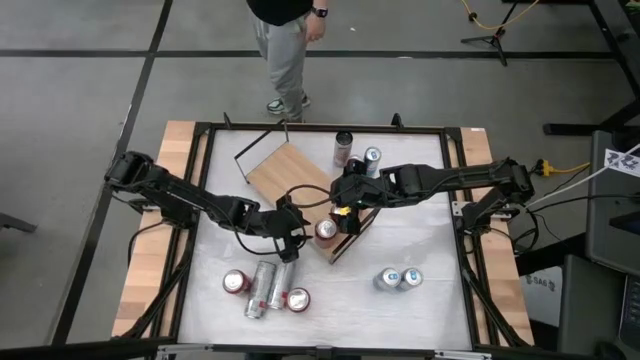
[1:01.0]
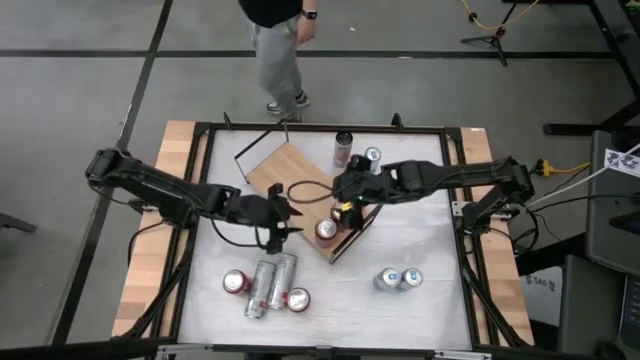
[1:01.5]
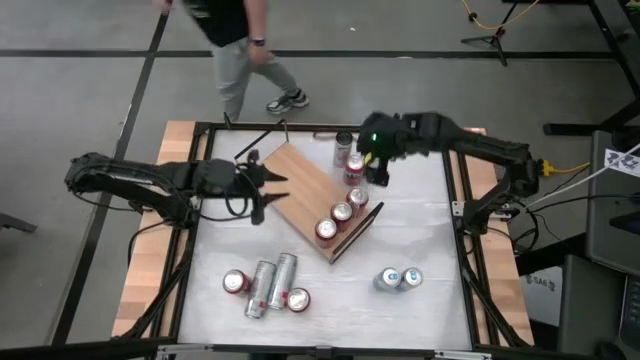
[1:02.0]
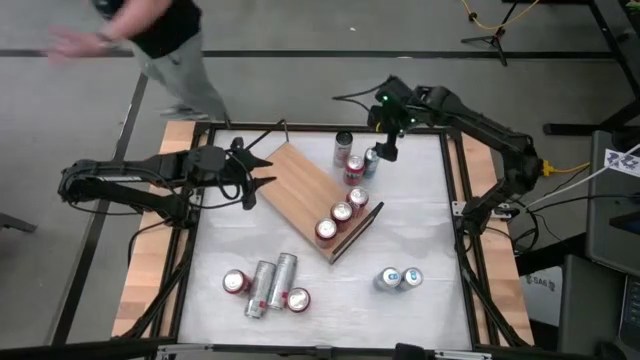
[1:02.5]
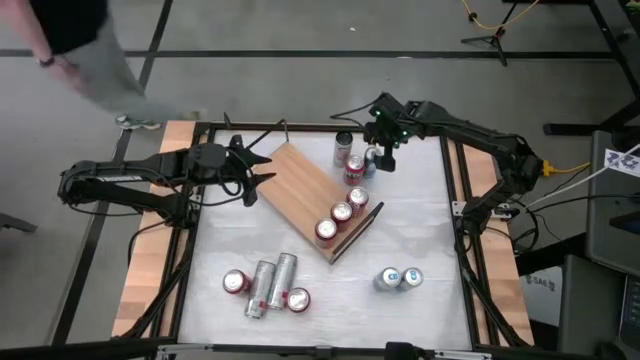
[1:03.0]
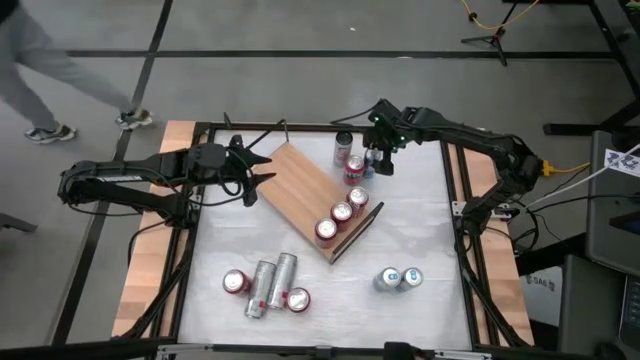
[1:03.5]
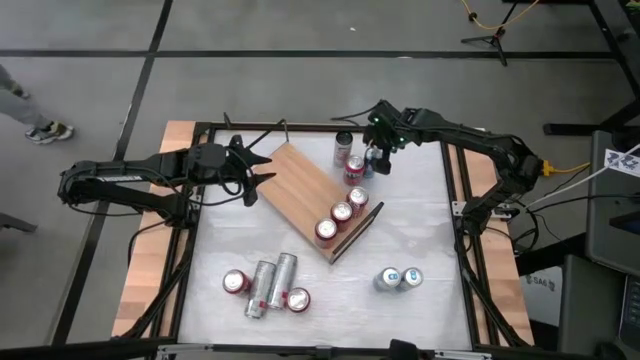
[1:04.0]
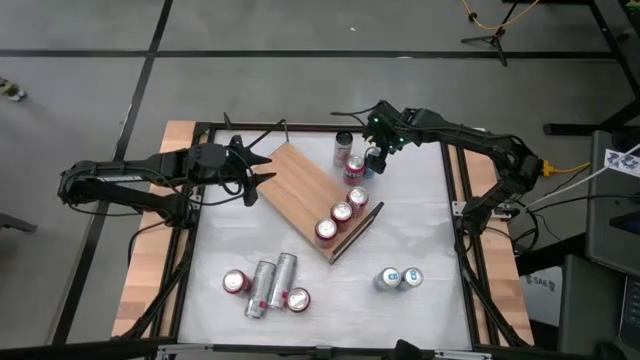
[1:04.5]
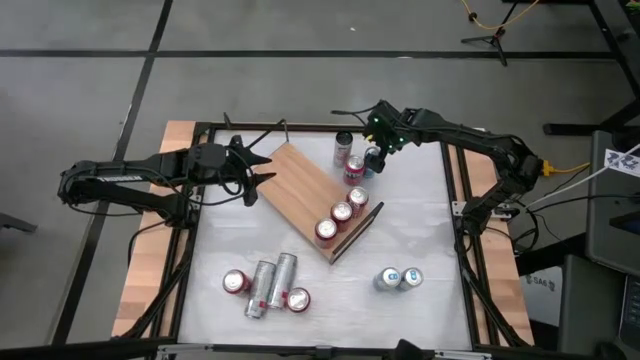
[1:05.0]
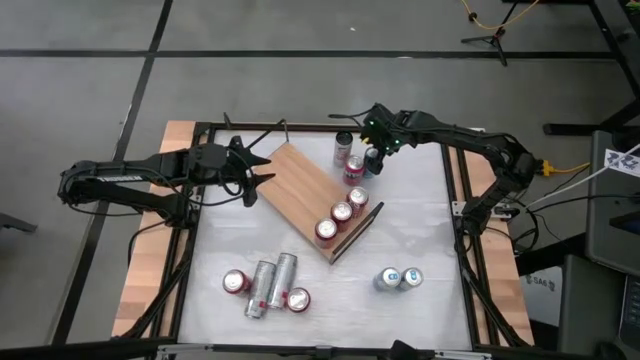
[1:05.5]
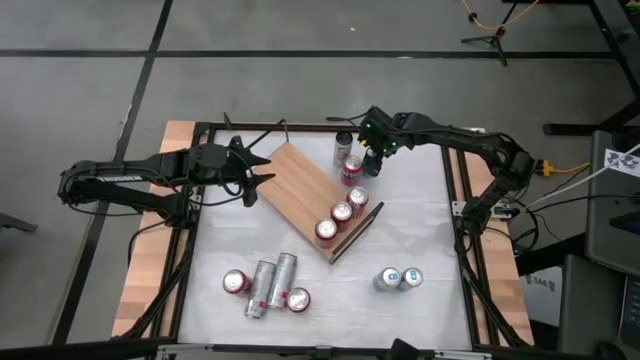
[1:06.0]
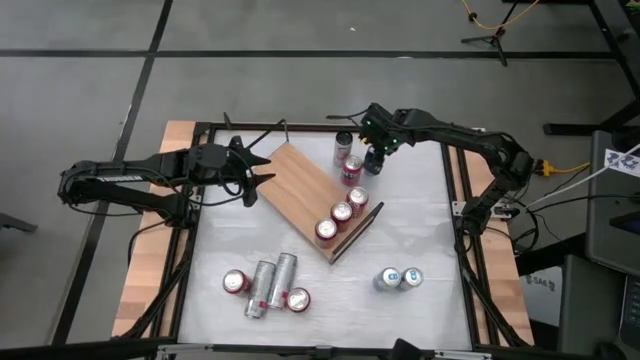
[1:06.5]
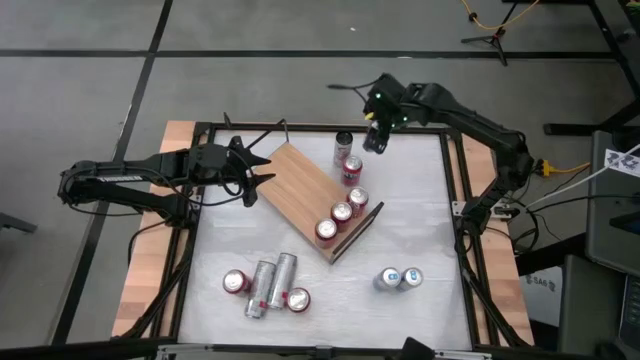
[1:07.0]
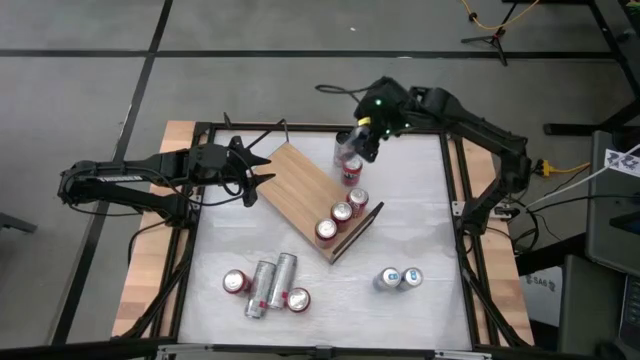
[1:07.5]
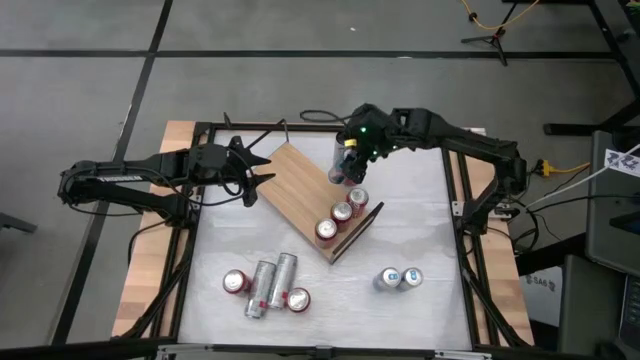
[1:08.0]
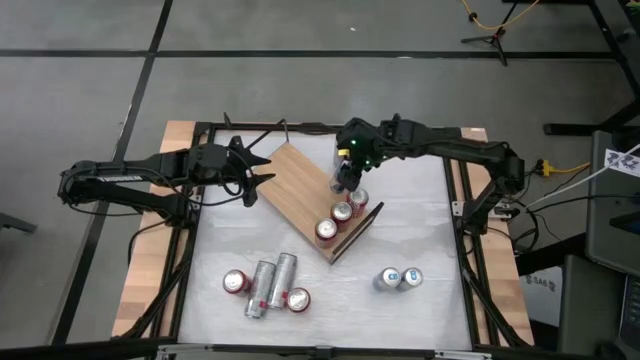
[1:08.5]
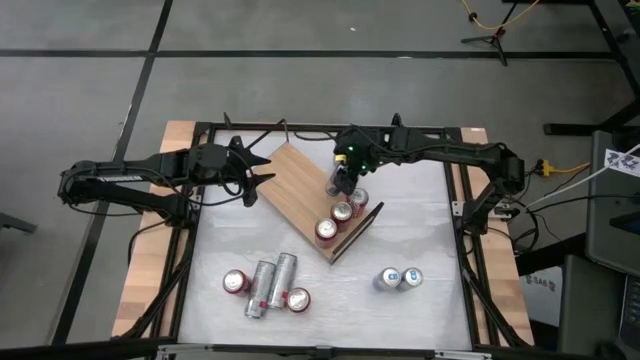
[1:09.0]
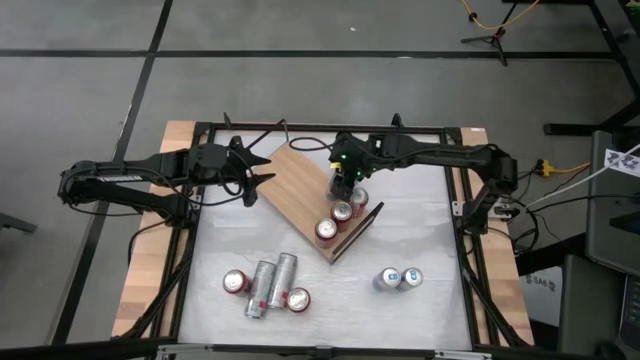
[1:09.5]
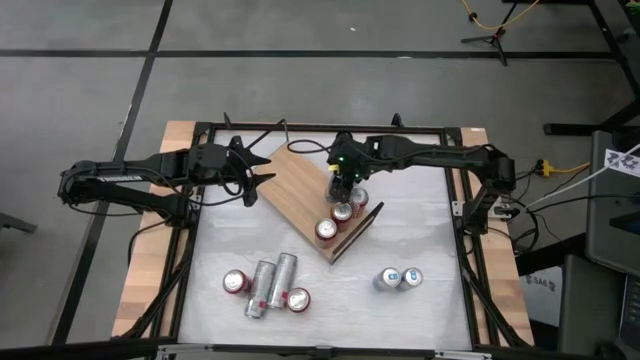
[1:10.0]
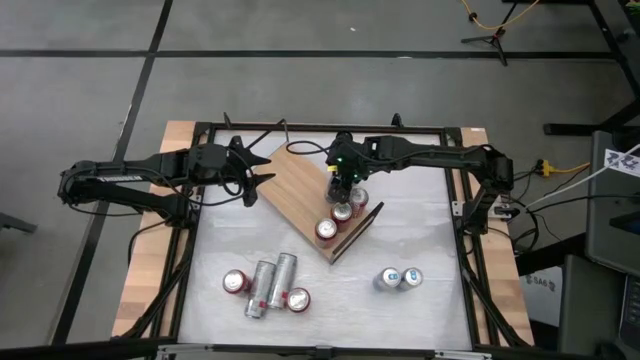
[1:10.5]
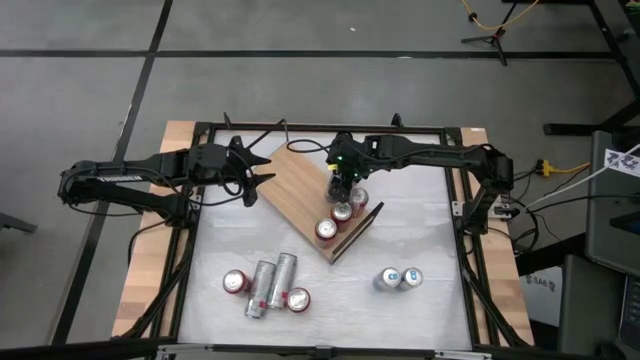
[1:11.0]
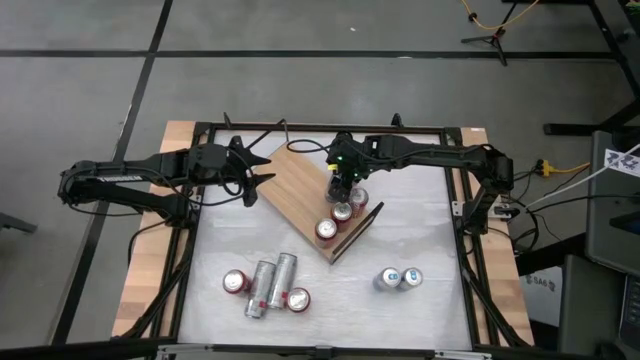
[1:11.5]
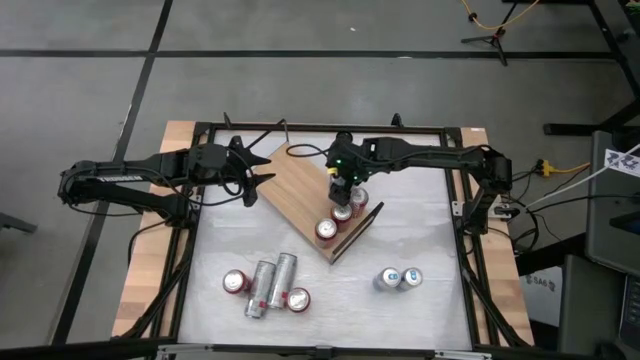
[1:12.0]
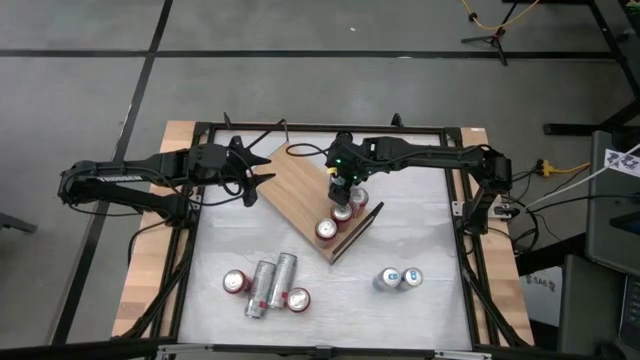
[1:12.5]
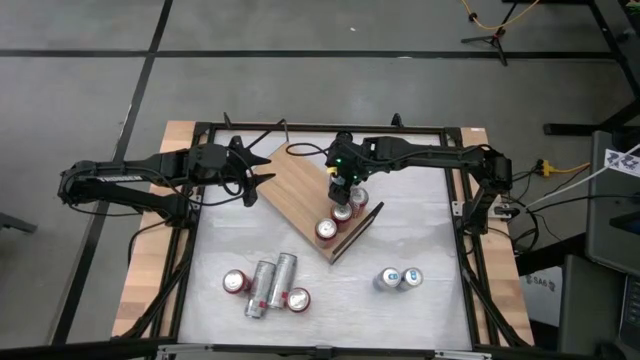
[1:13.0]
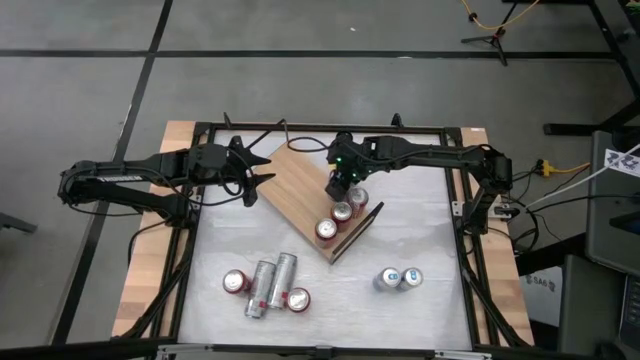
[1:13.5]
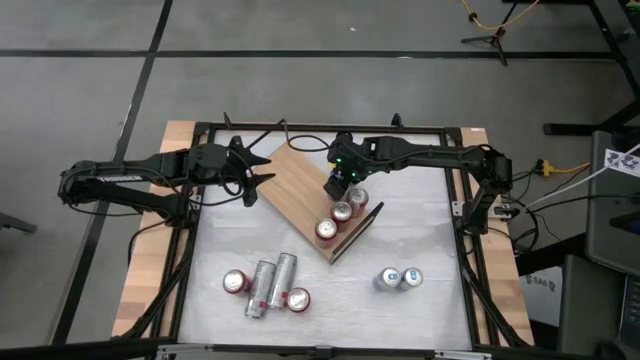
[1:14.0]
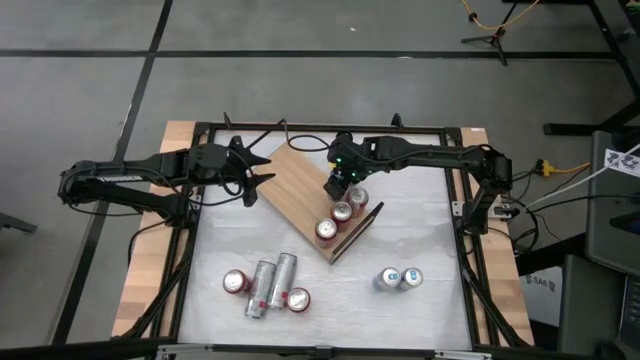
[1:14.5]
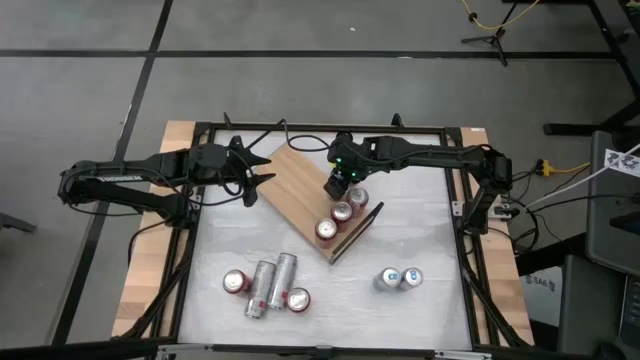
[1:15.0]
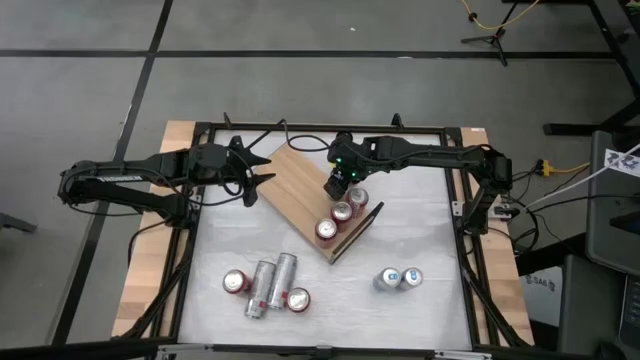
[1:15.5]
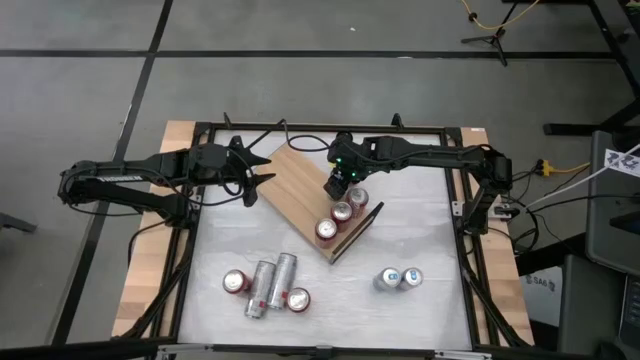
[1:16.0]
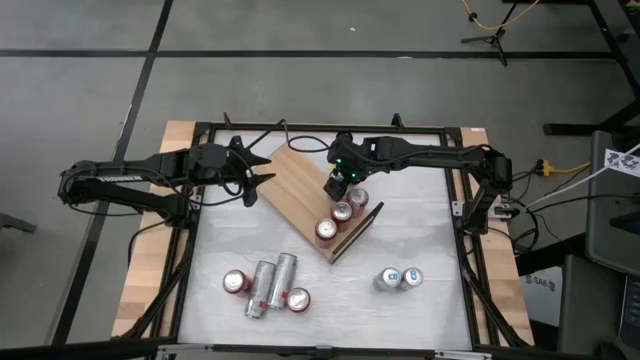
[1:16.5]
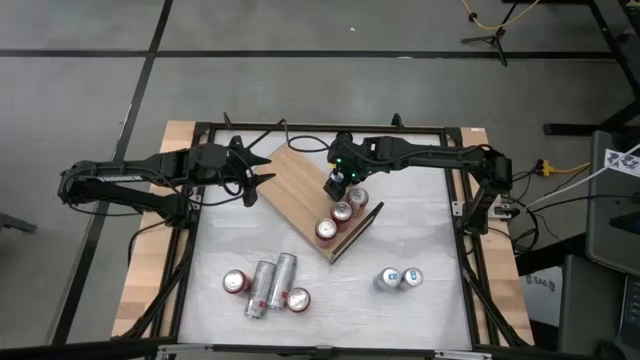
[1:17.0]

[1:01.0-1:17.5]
Task: Place canned beverage on shelf
Put the top left blue soda can on the shelf

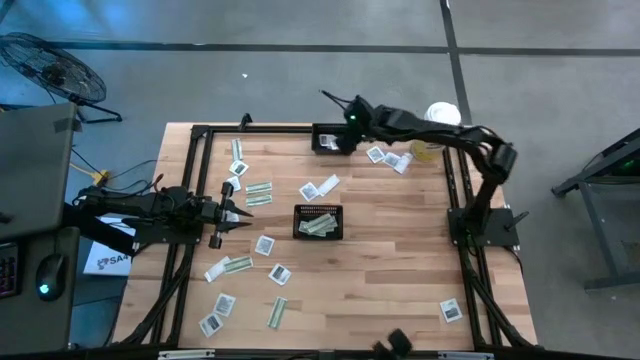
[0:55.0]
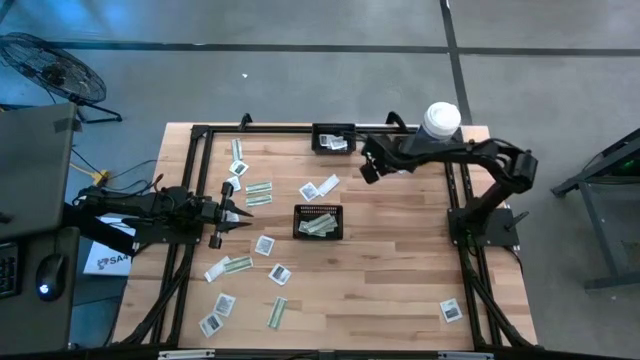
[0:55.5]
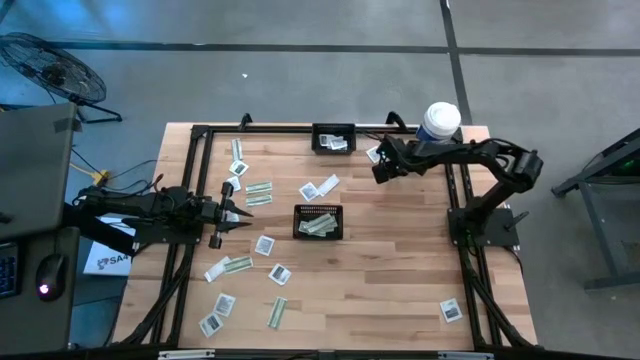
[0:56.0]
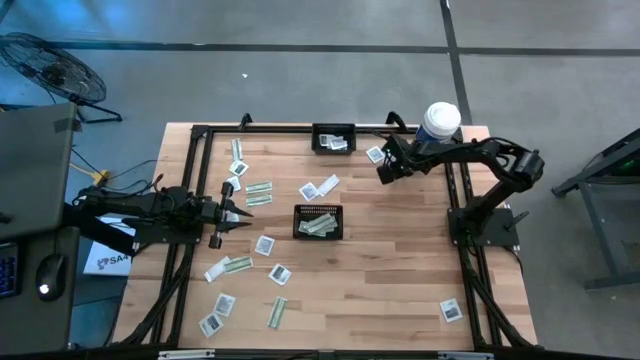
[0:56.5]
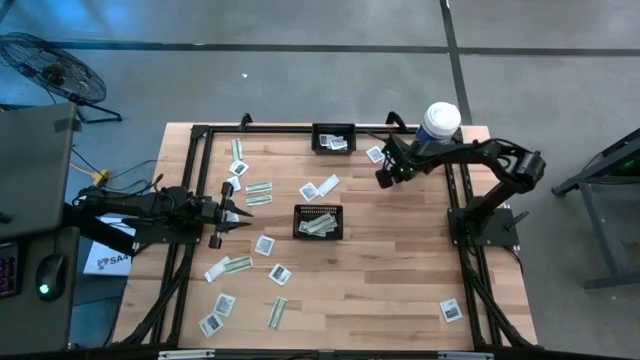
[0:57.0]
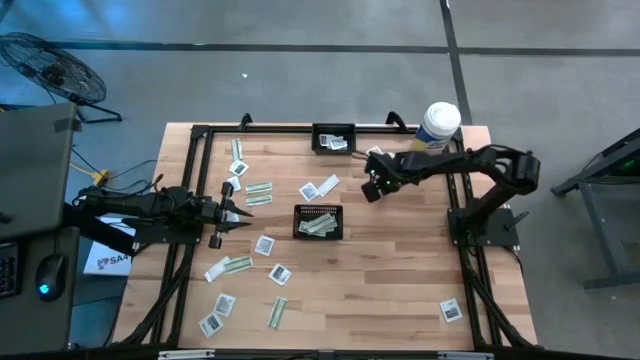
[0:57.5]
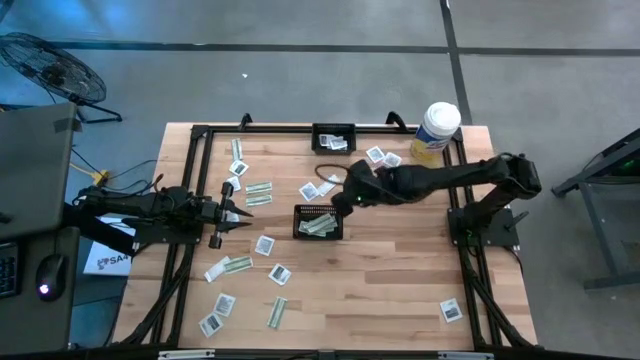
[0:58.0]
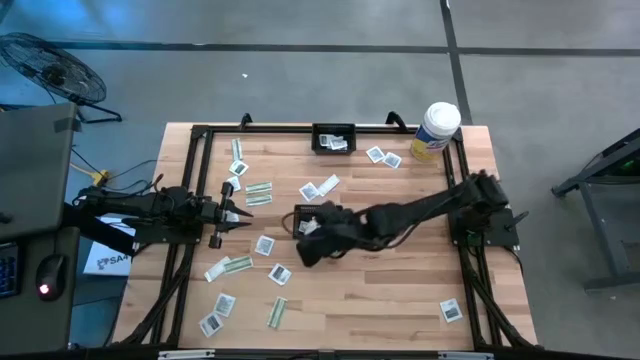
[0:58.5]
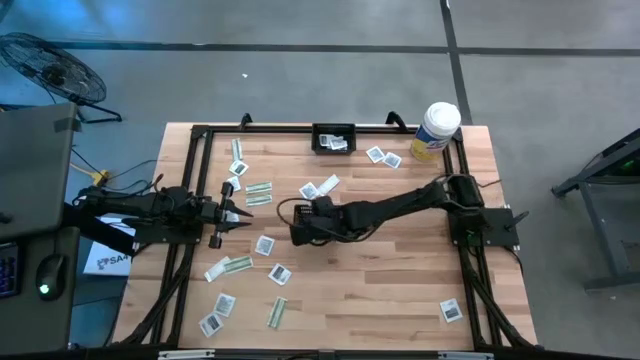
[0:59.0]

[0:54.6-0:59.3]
Task: Pick & Place First Aid Supplies
Put the bandage into the bottom black basket
